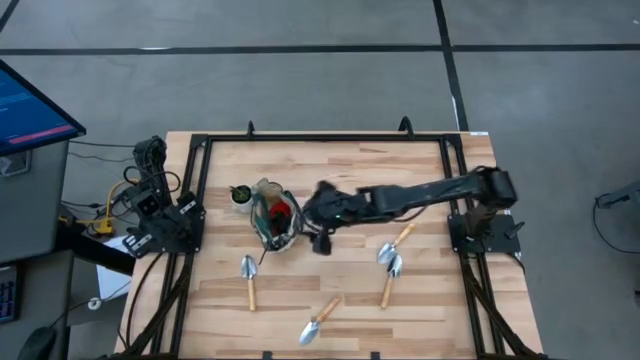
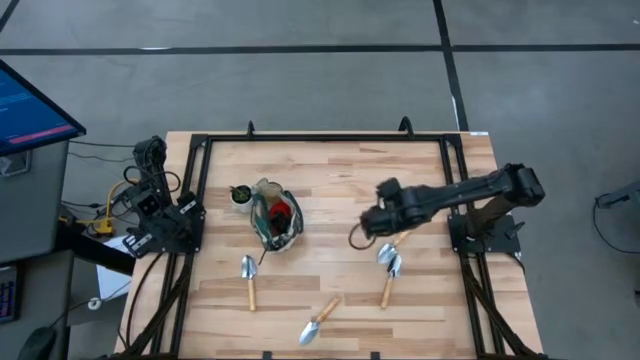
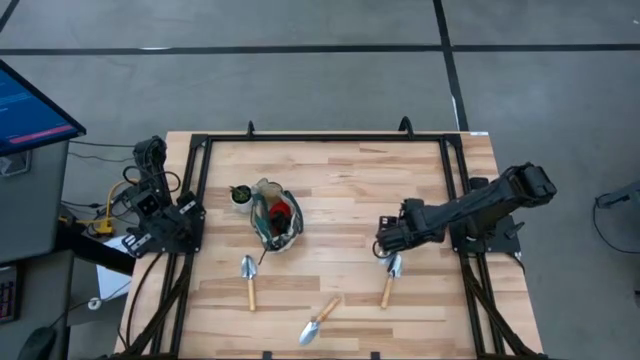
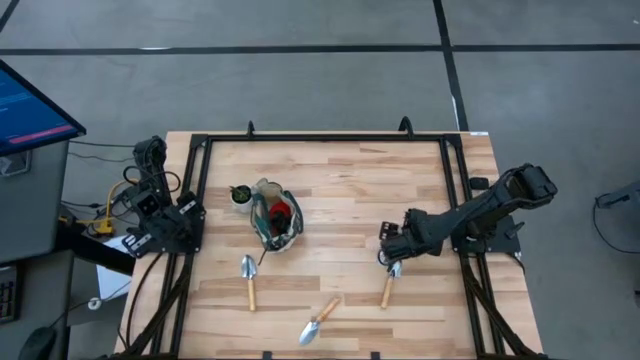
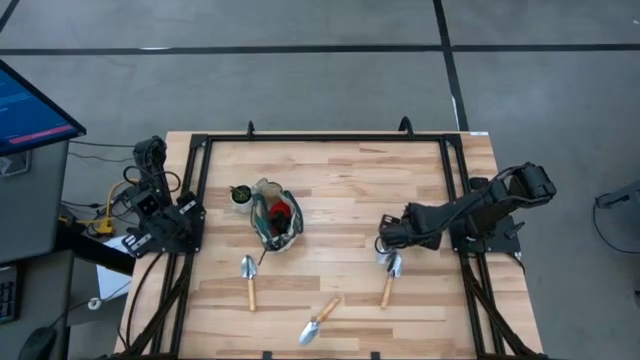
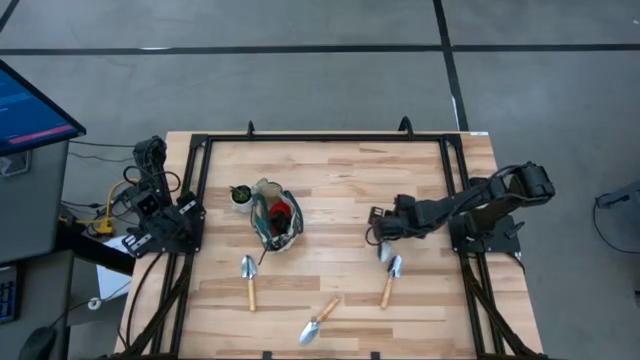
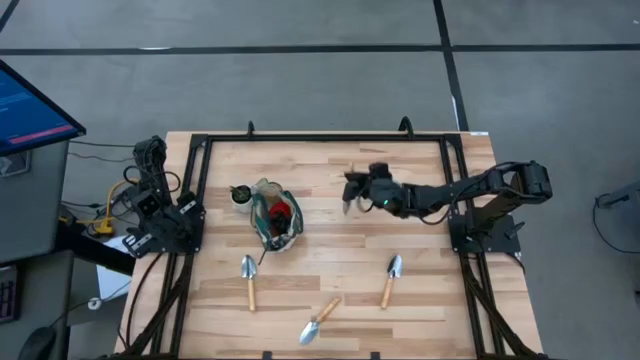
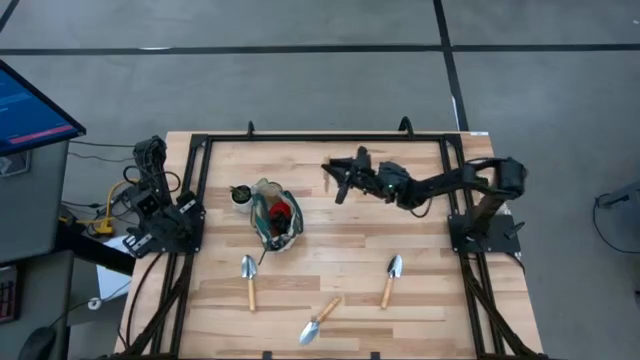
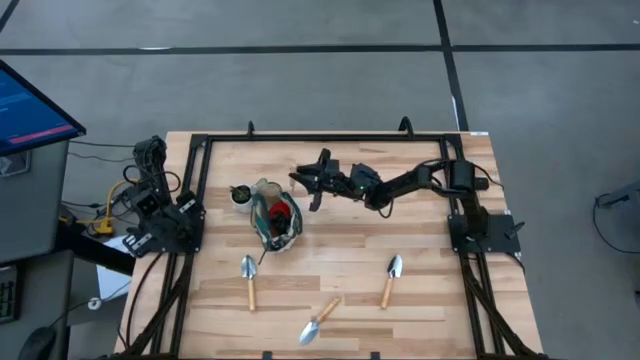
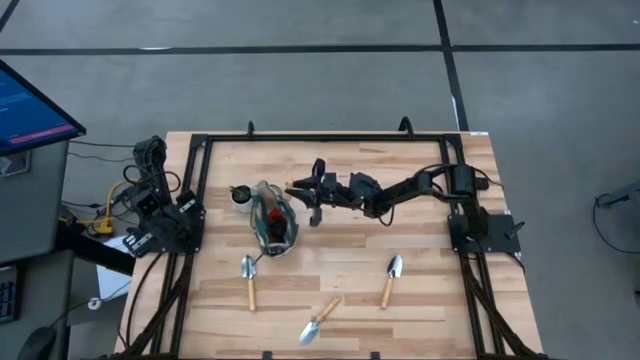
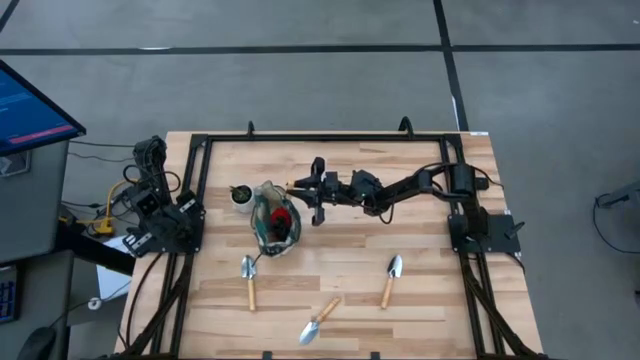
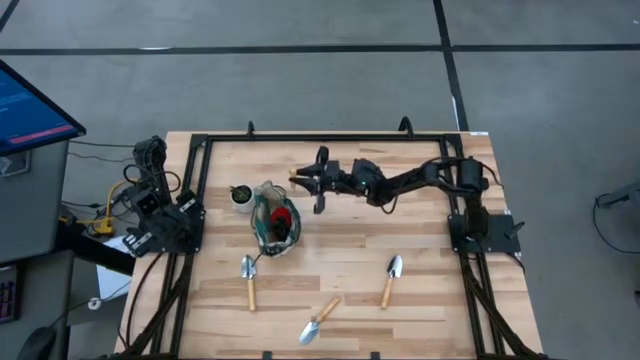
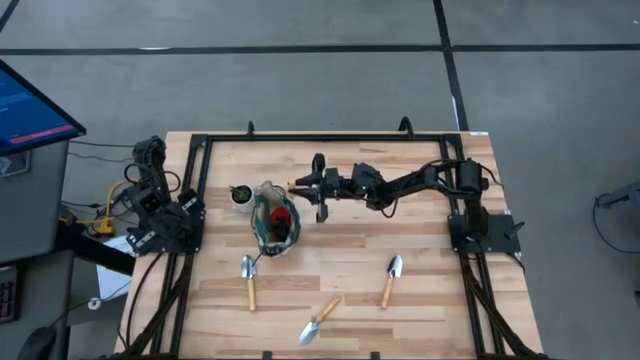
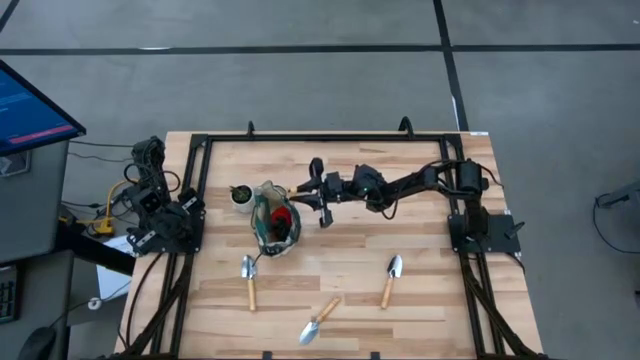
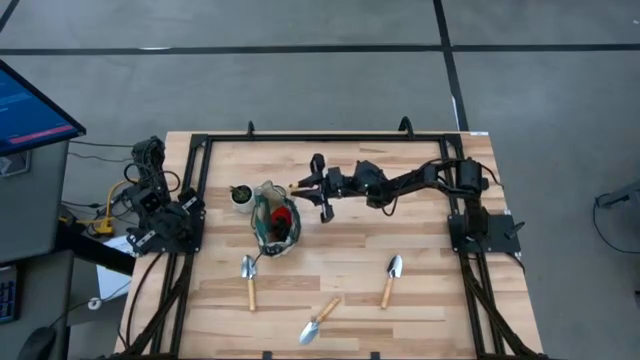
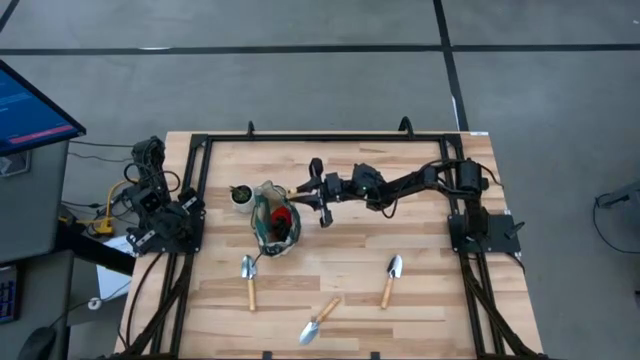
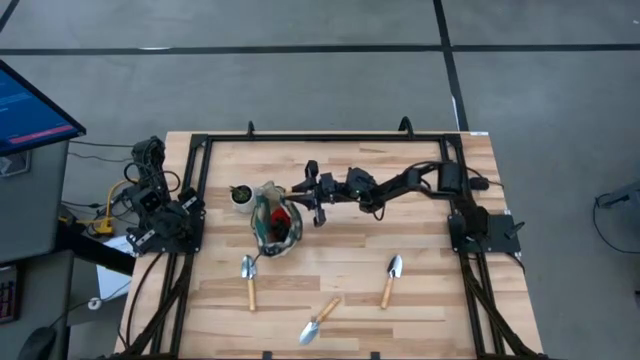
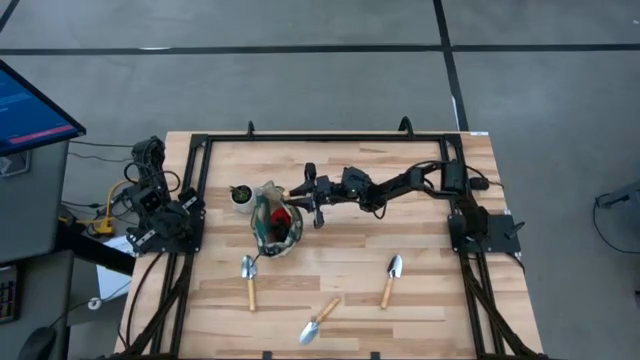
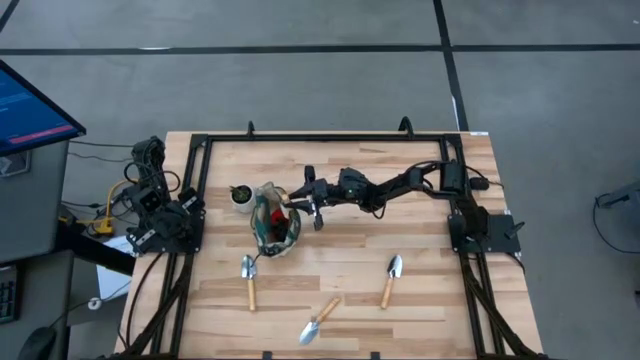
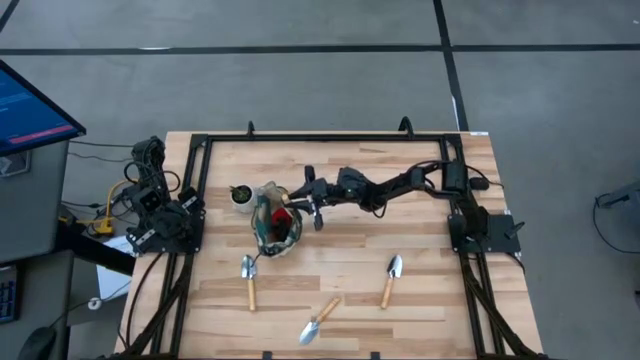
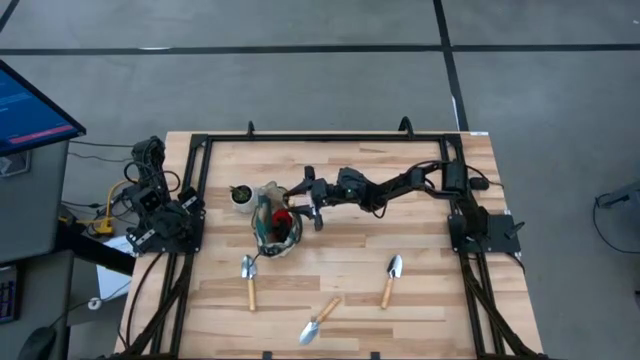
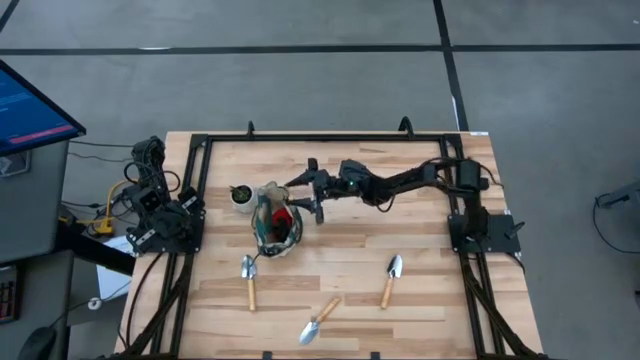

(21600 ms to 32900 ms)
Task: Pick & Place Garden tools in Gardening bag
Put the trowel into the gardening bag

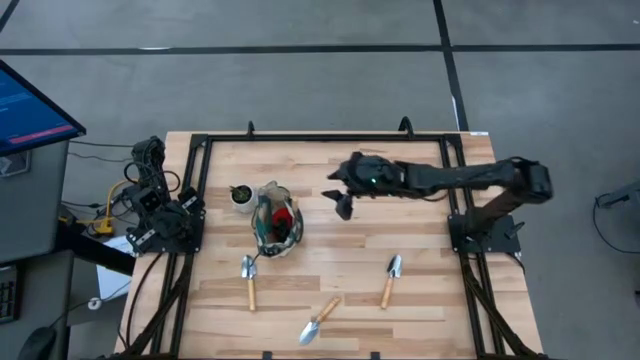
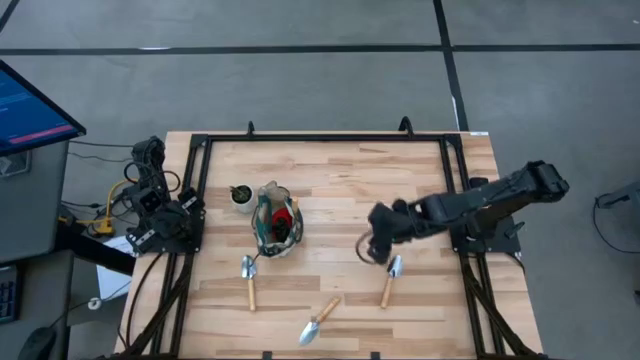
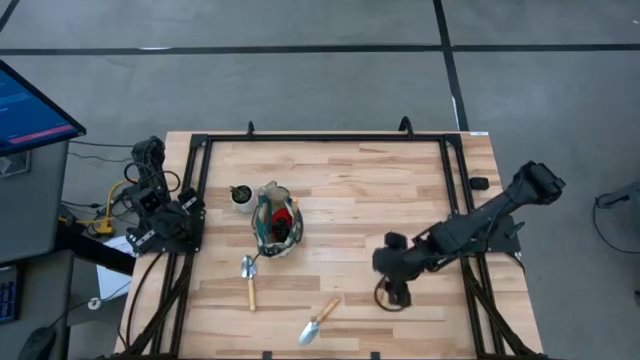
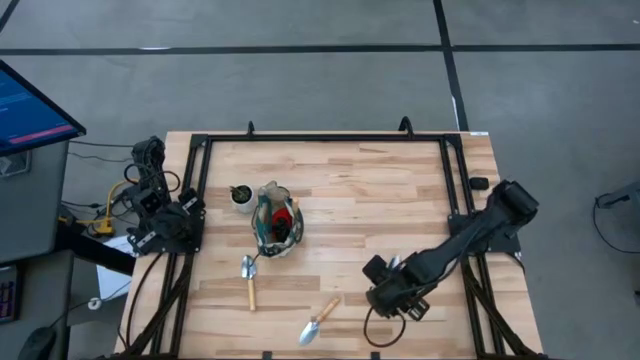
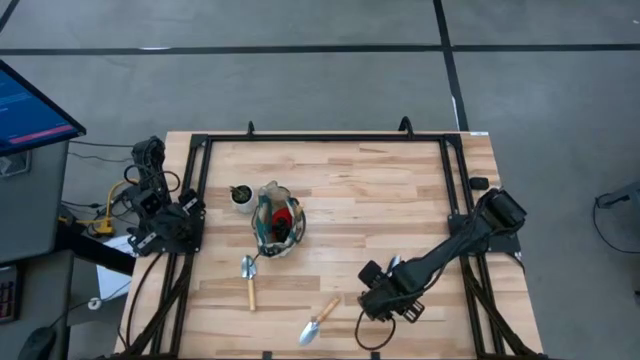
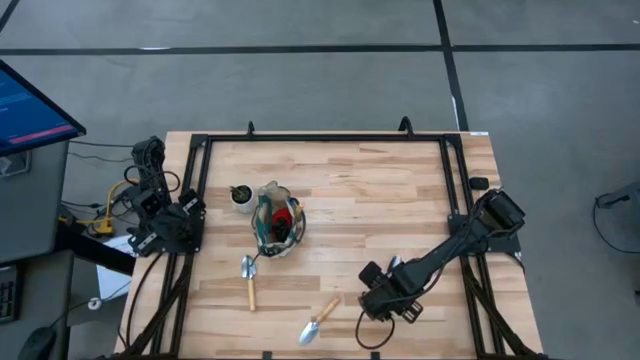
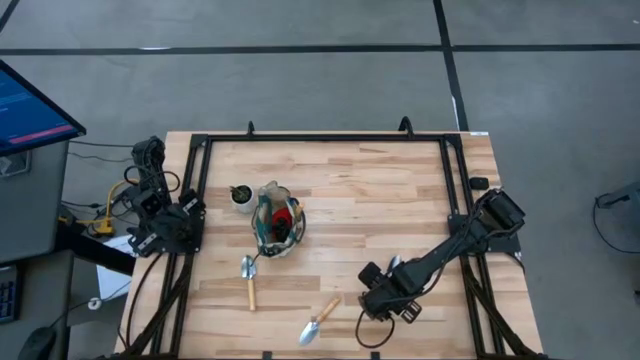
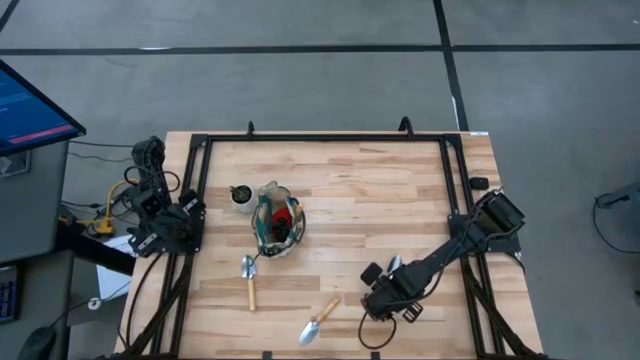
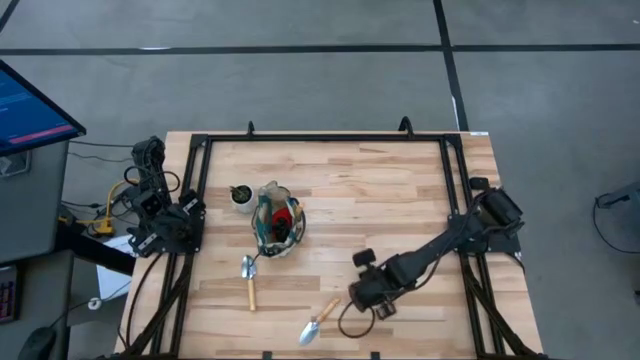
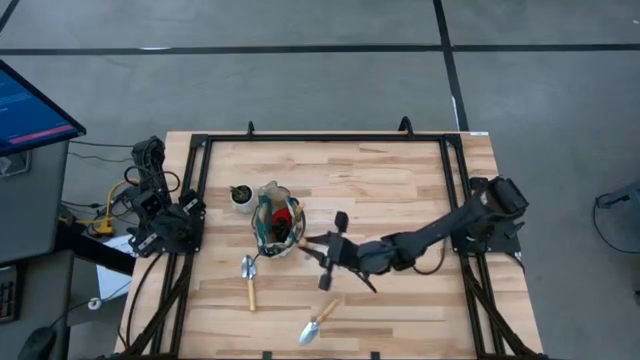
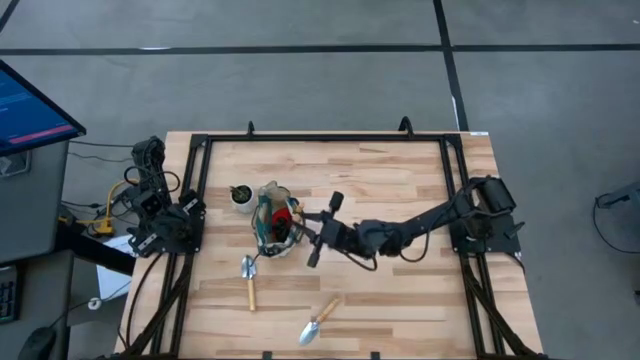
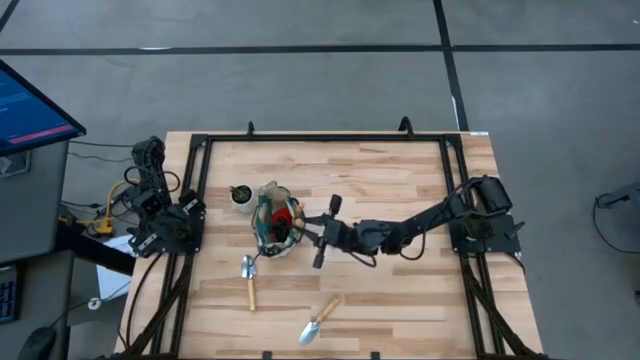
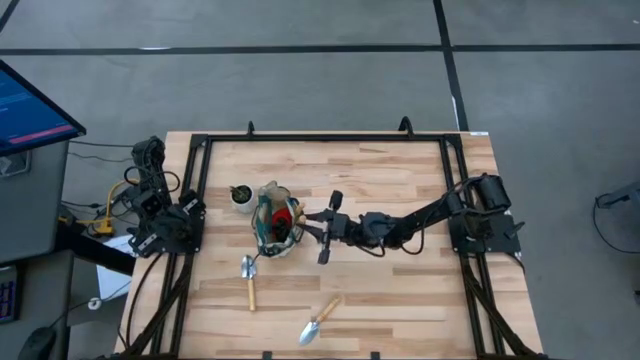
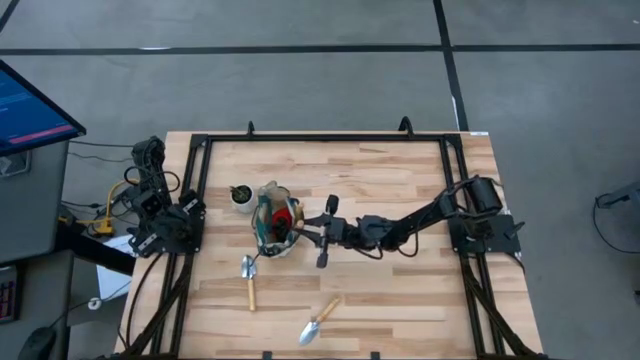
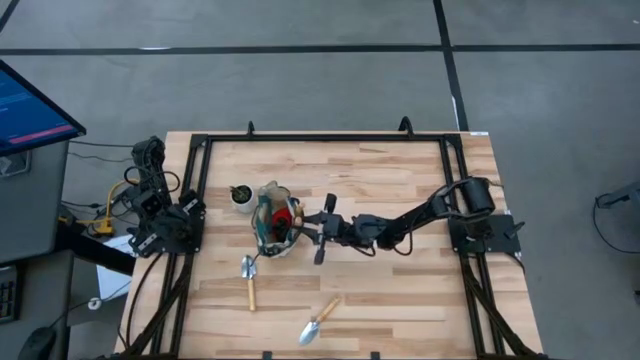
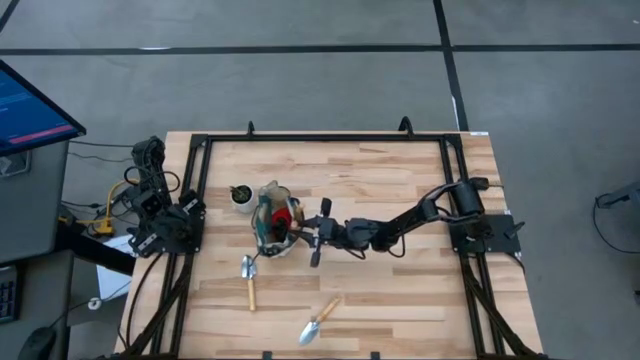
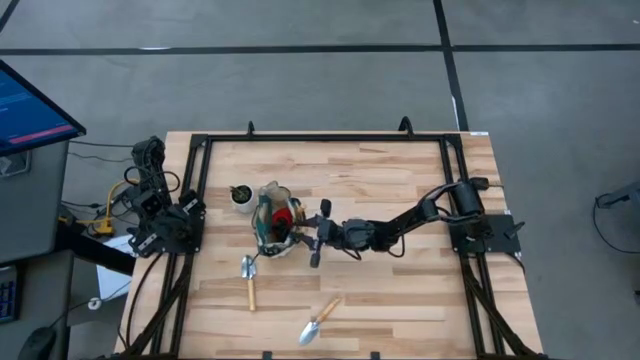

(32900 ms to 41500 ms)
Put the trowel into the gardening bag

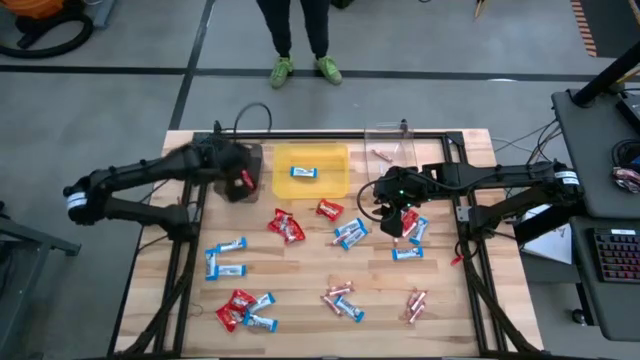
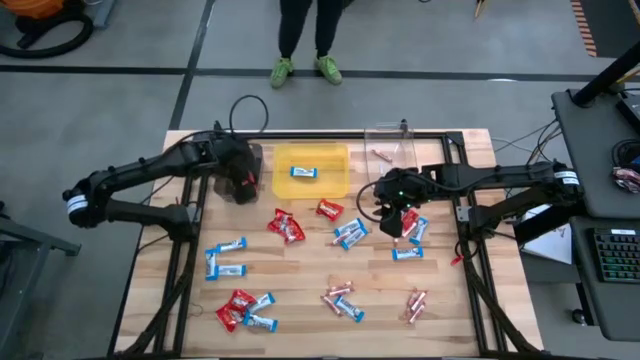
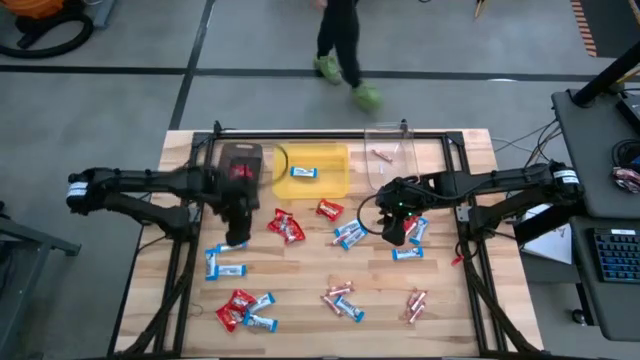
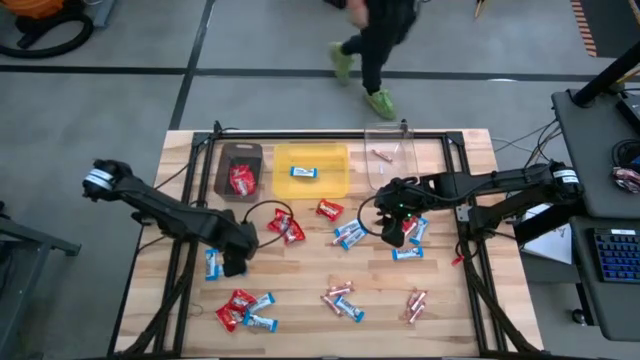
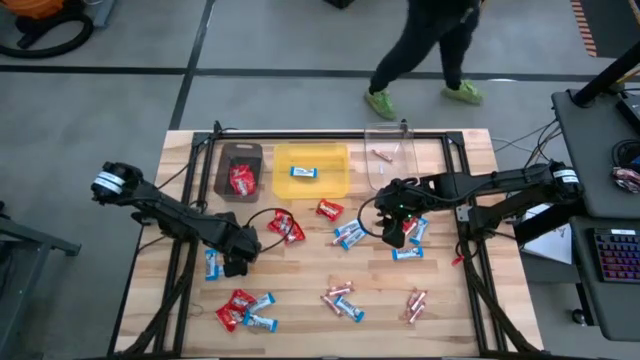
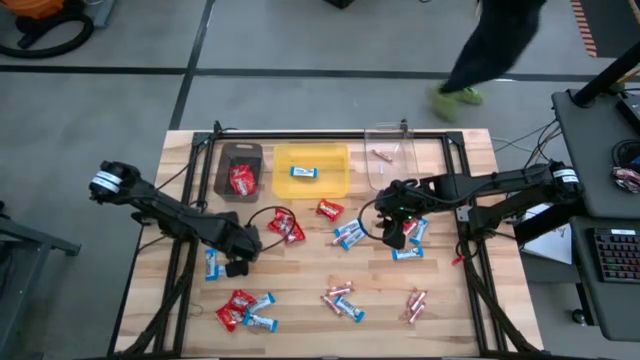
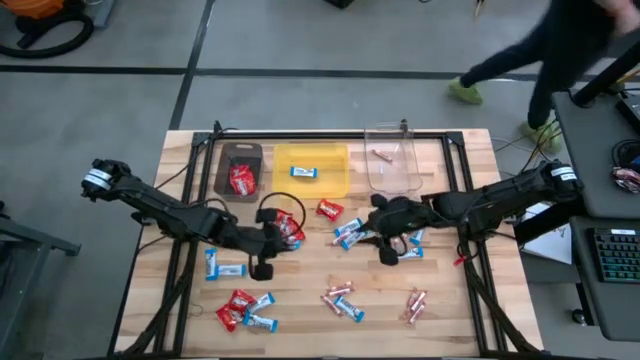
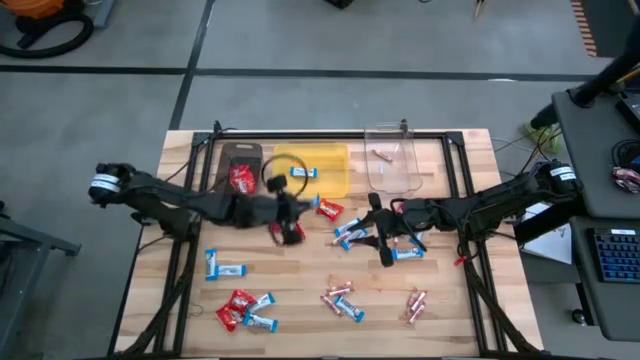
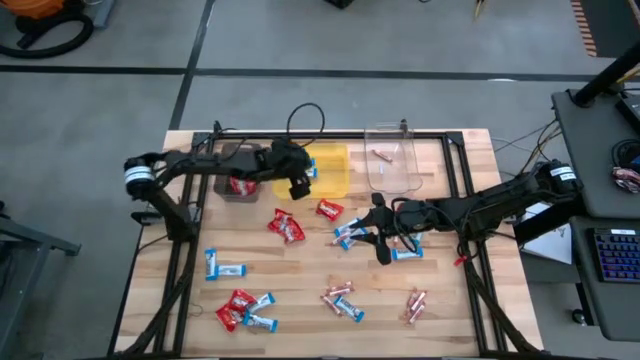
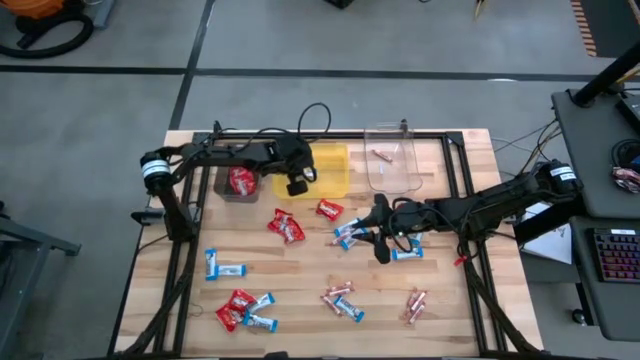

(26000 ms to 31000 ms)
Task: Sort candy
Put the white candy into the yellow bin
